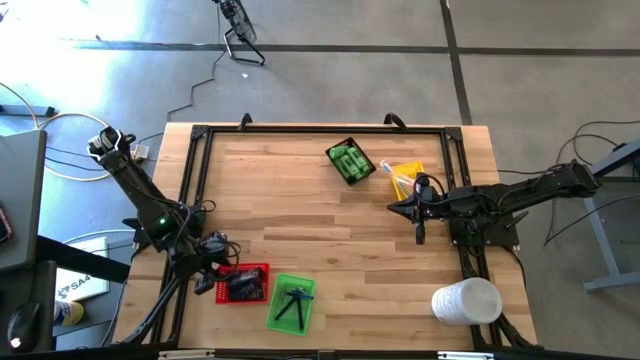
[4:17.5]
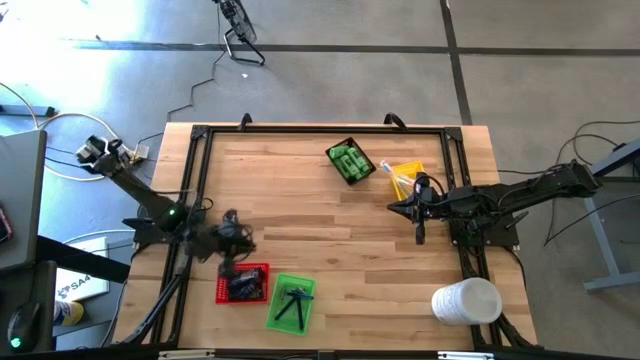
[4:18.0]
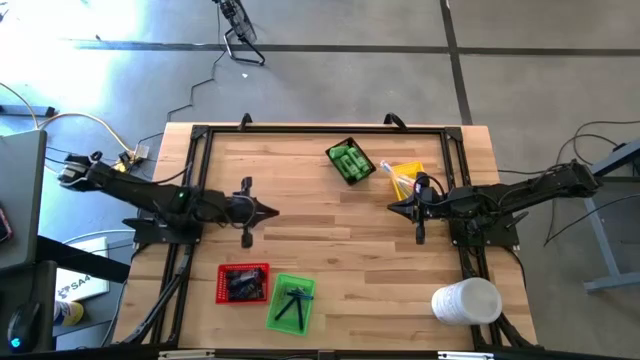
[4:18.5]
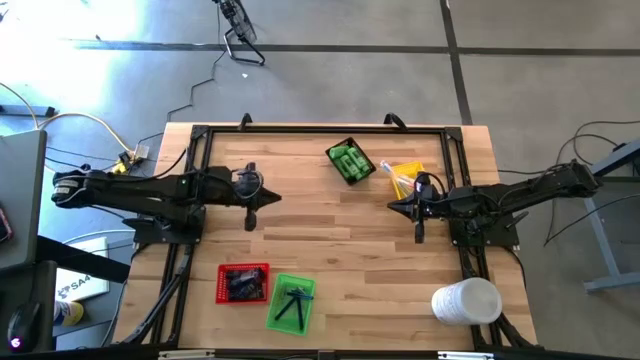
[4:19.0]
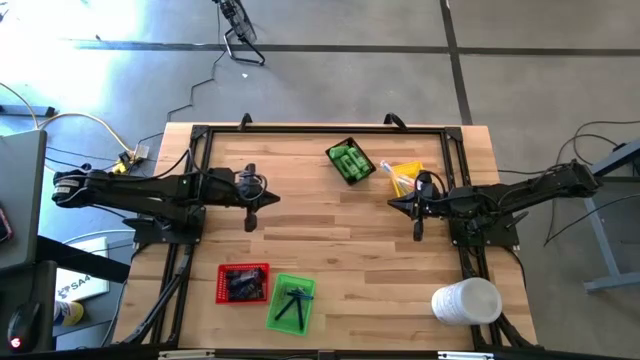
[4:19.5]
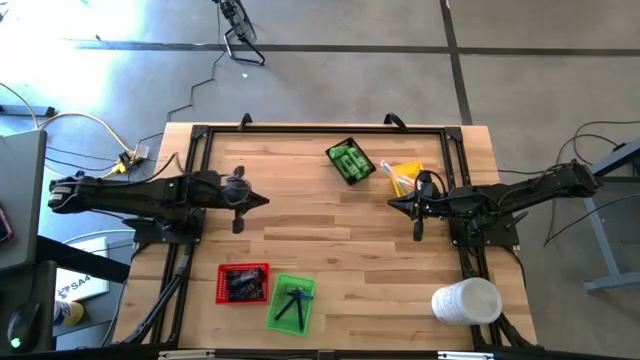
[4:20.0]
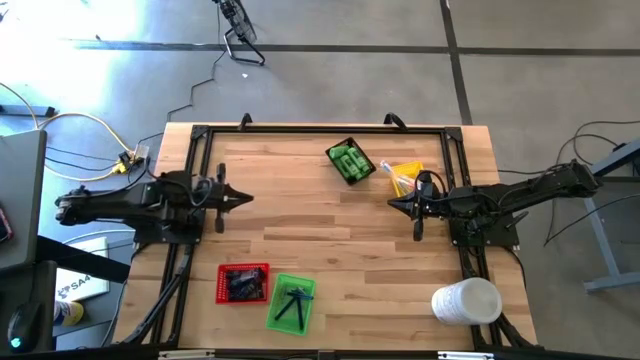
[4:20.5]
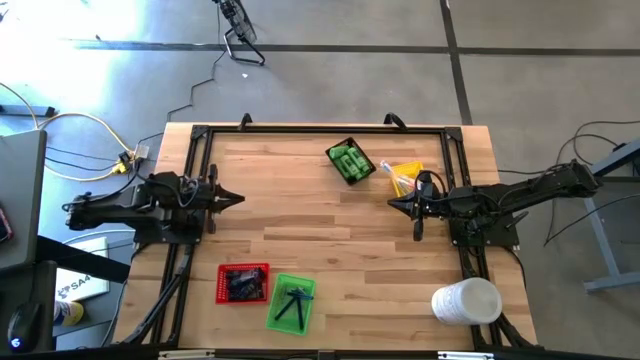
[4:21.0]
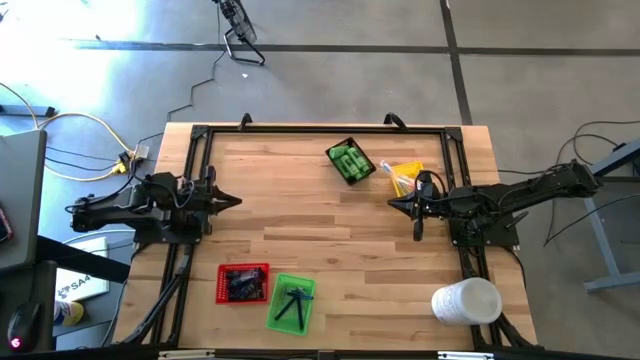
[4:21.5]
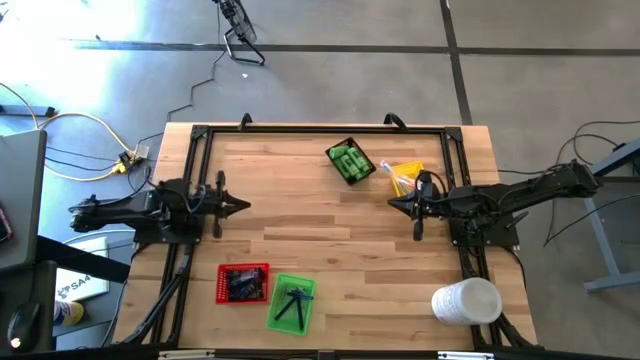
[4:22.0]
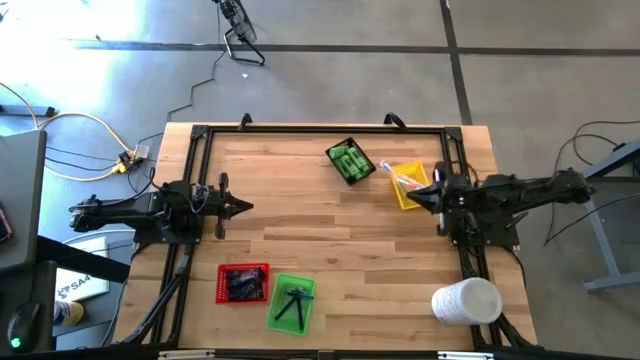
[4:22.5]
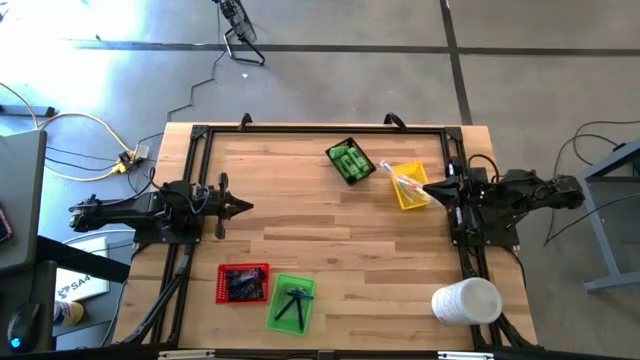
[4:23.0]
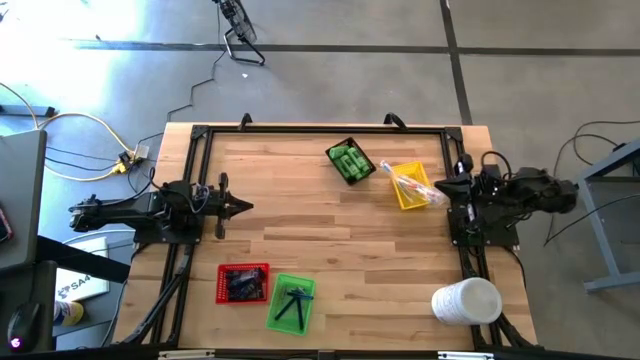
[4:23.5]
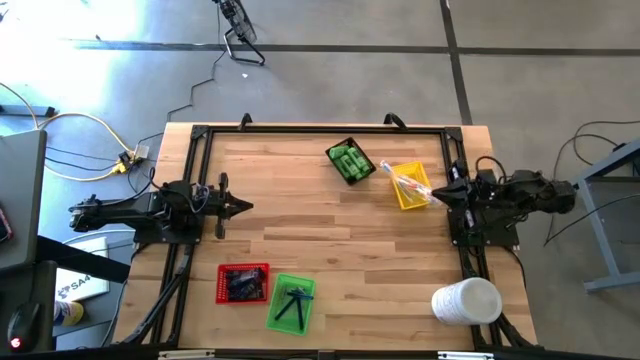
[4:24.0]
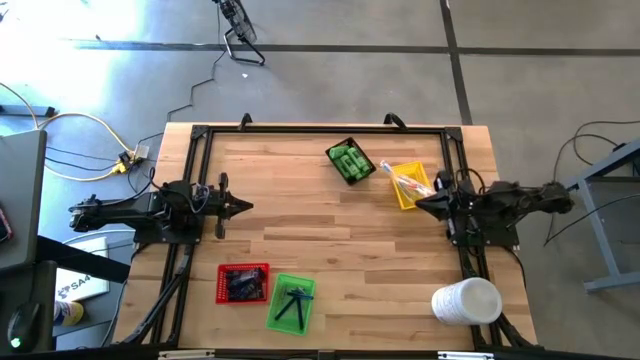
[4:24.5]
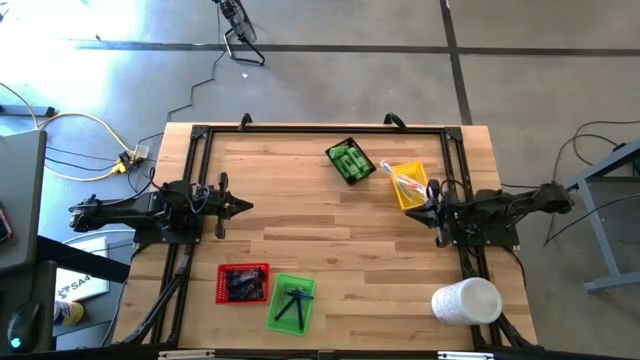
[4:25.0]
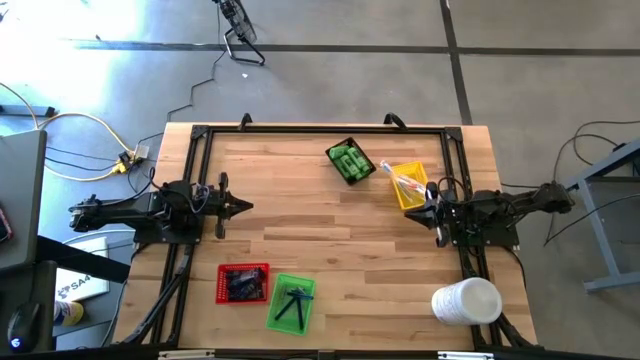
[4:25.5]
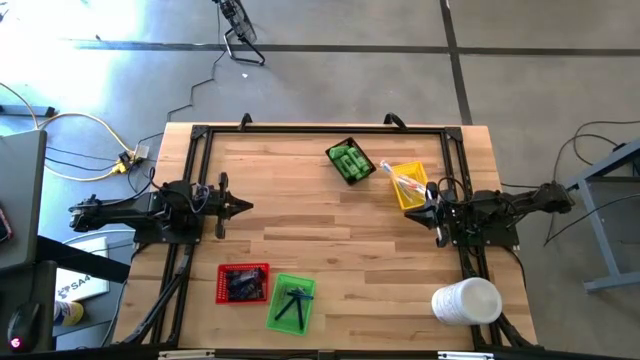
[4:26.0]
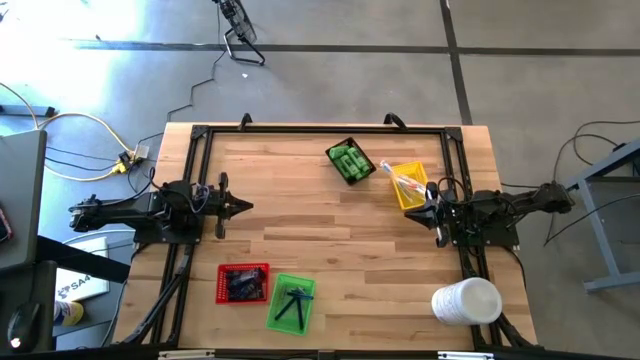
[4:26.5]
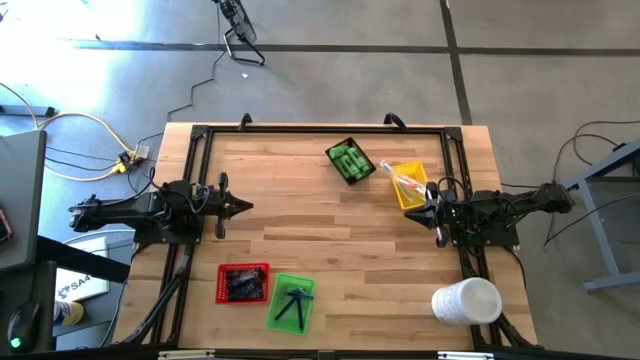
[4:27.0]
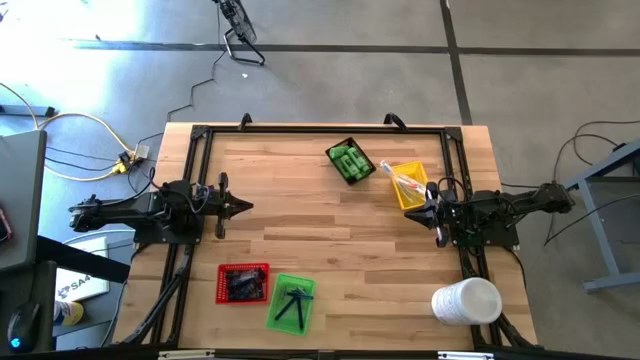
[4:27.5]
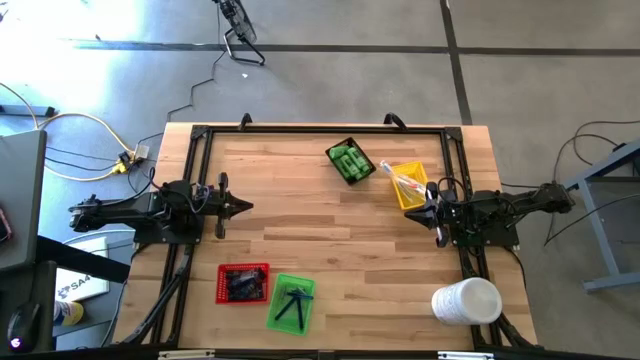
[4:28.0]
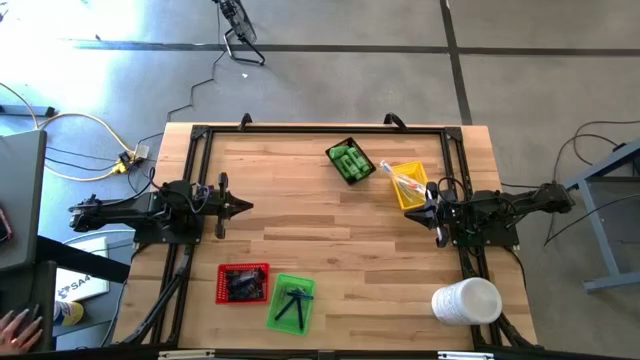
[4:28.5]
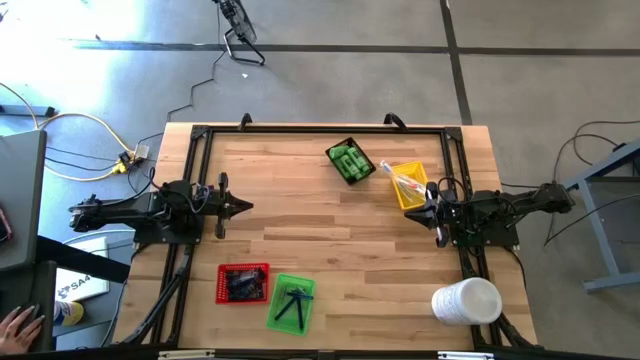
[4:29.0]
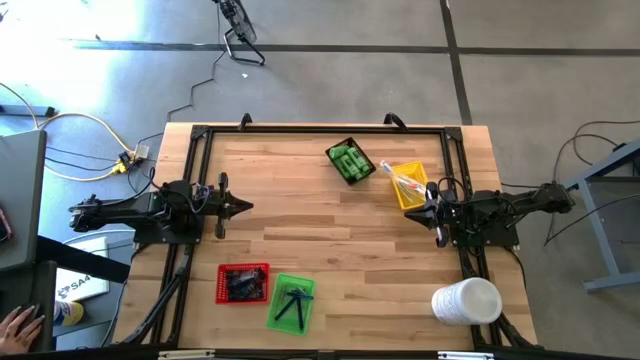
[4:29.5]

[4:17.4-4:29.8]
Task: Pick & Place Travel size toiletries
Return to Home Position

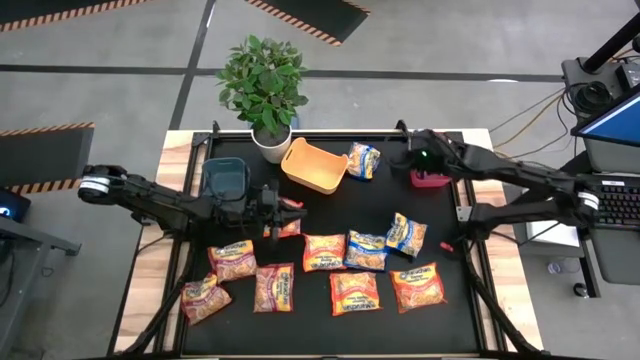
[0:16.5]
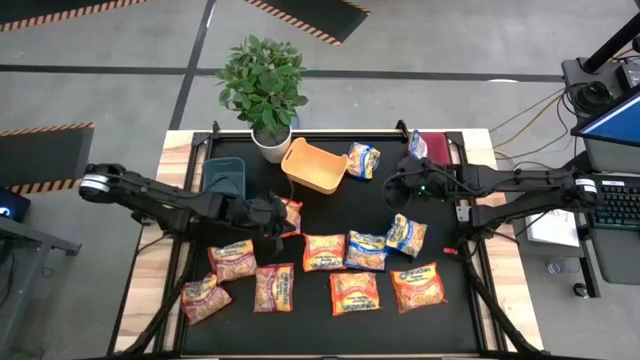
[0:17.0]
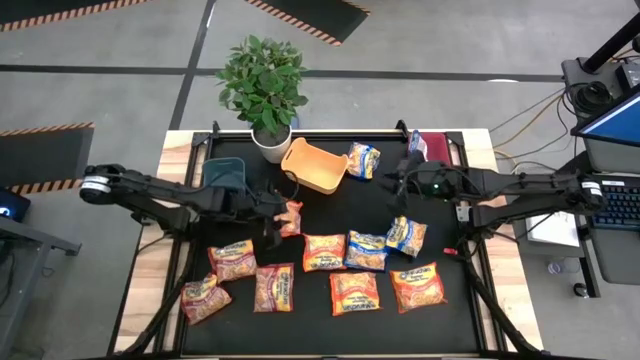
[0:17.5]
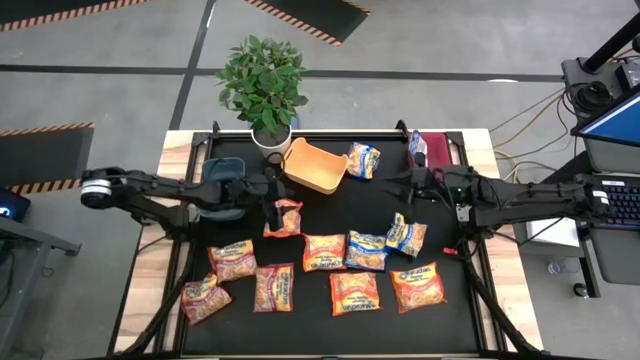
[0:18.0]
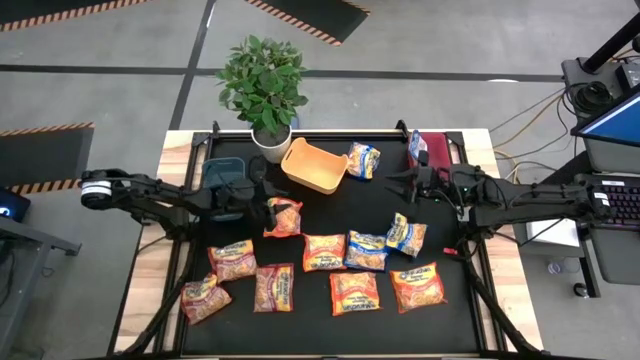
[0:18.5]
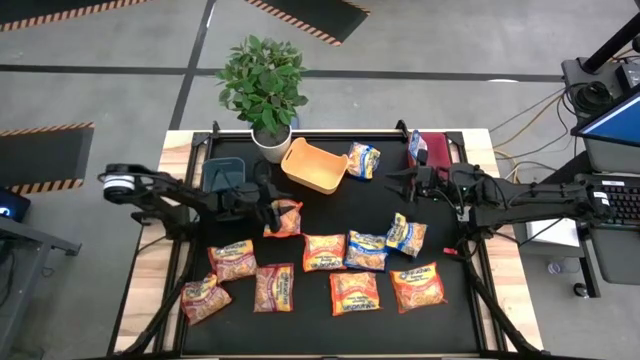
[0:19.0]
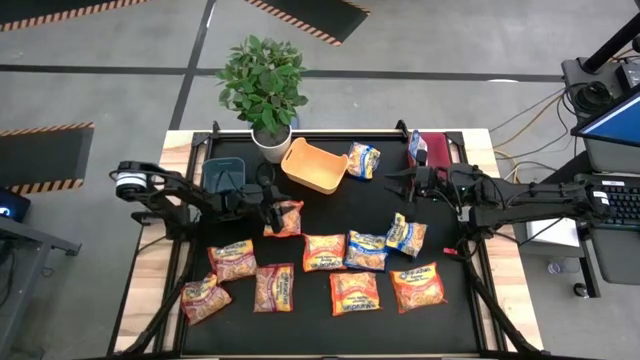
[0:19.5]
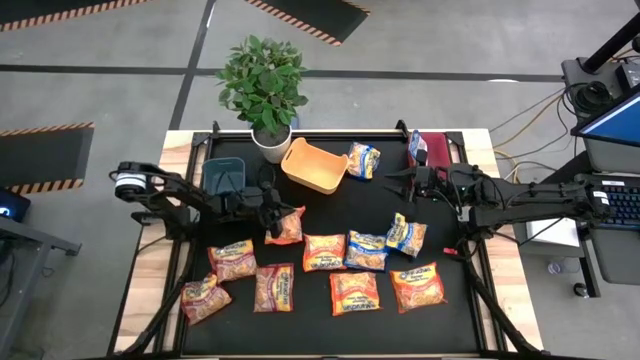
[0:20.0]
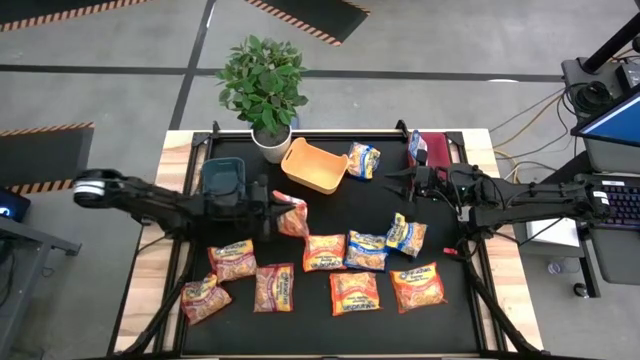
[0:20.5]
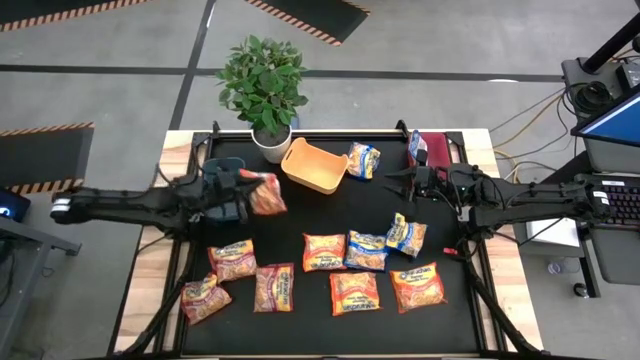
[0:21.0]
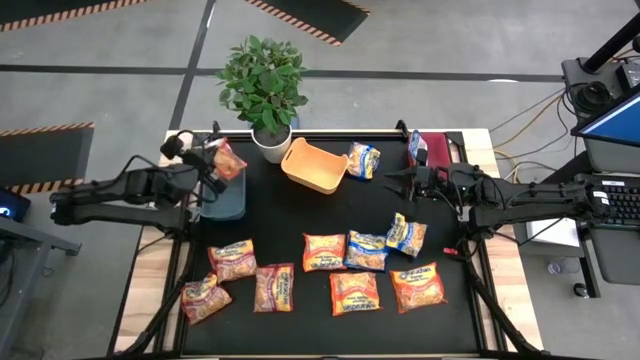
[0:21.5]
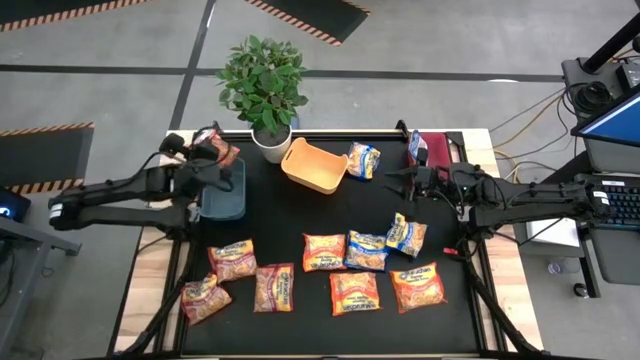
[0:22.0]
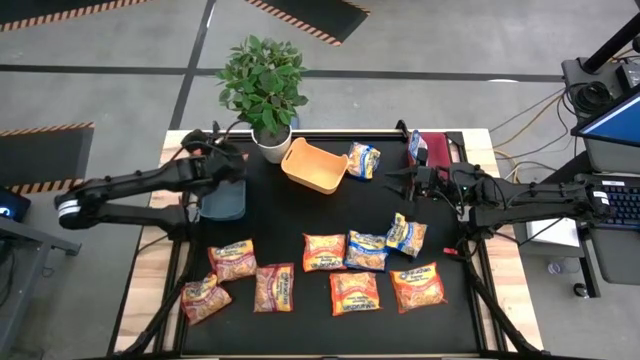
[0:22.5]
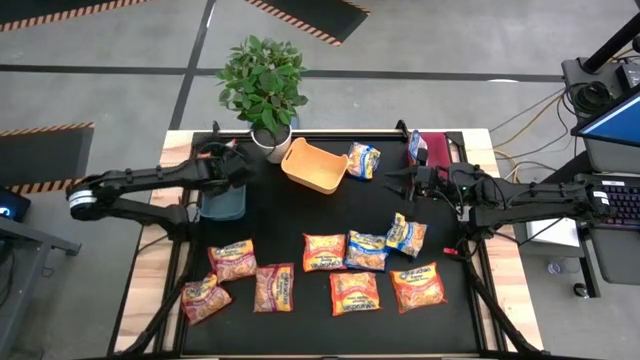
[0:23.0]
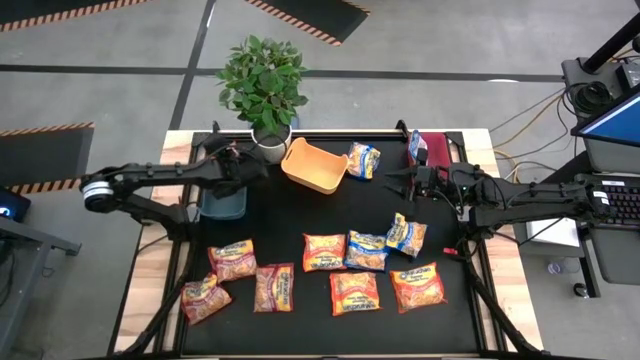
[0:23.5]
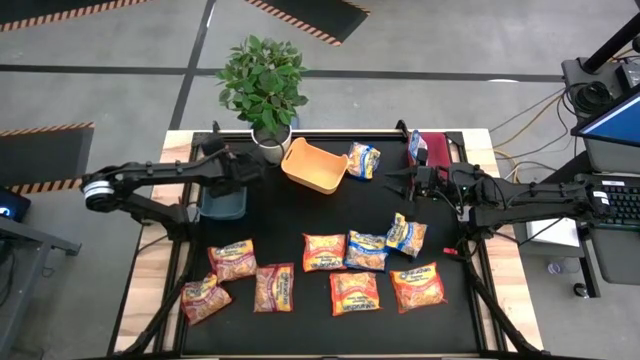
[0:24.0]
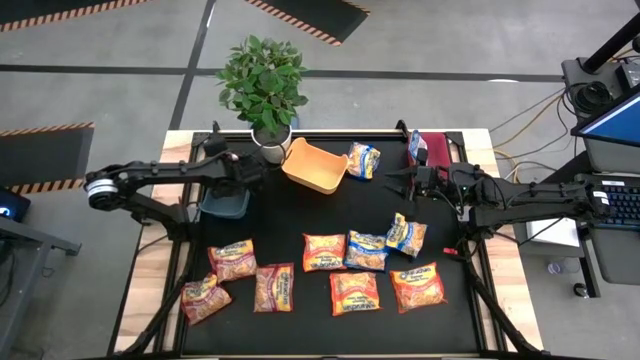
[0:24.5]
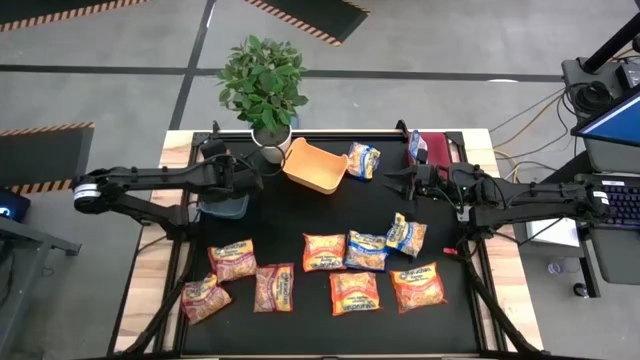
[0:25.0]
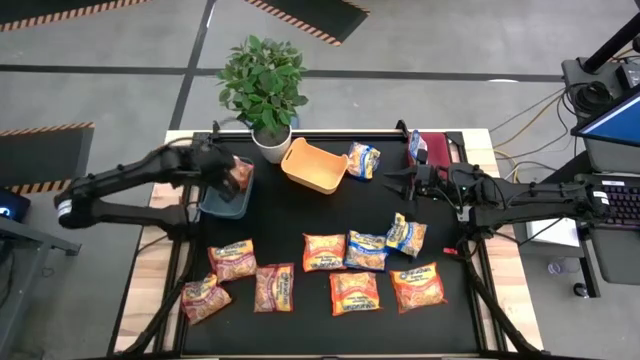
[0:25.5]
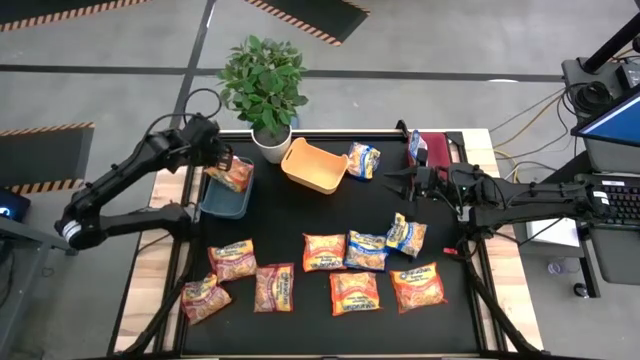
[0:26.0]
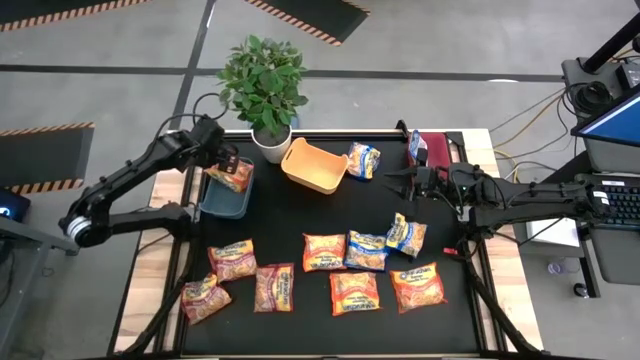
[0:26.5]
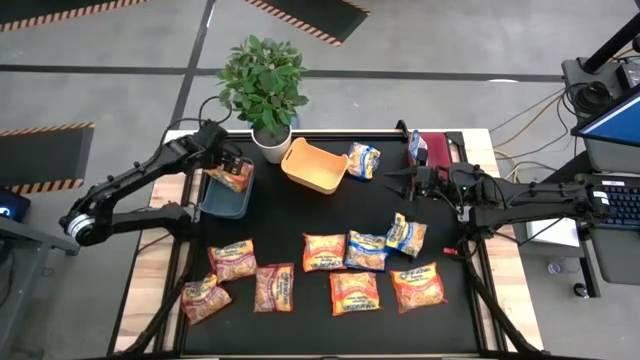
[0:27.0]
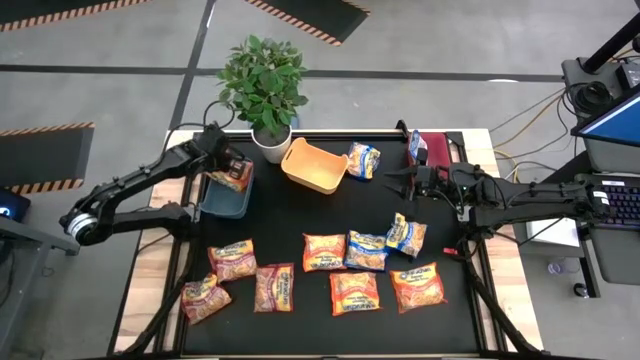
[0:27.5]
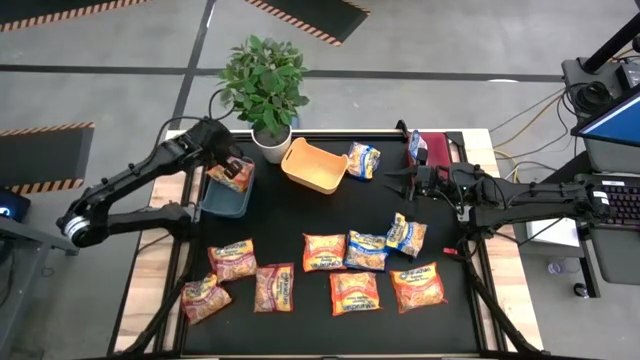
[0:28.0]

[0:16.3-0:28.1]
Task: Sort Maruchan noodles
Put the orange noodle pack into the blue bin
